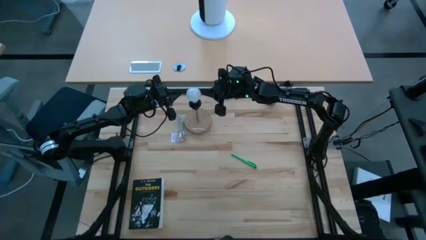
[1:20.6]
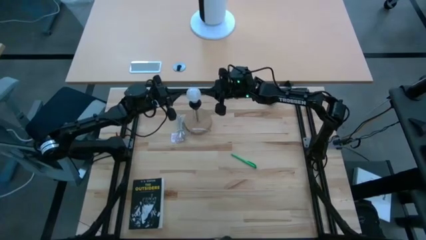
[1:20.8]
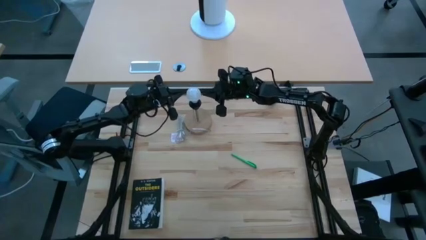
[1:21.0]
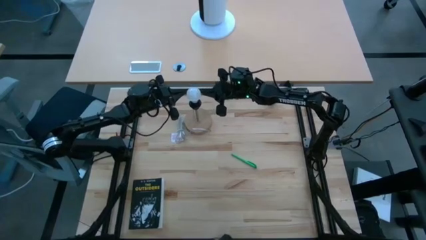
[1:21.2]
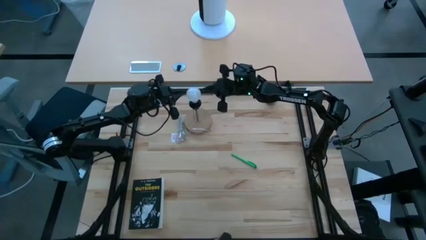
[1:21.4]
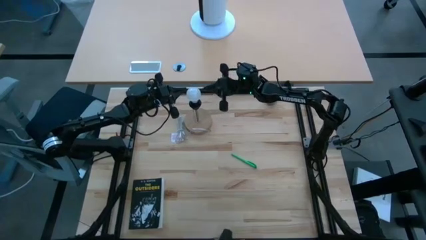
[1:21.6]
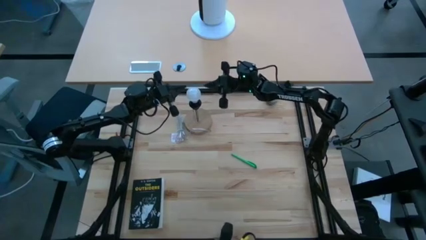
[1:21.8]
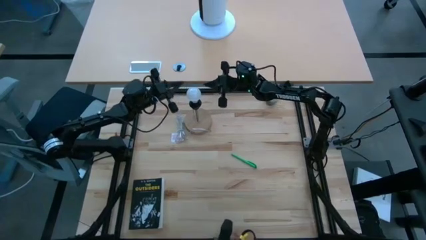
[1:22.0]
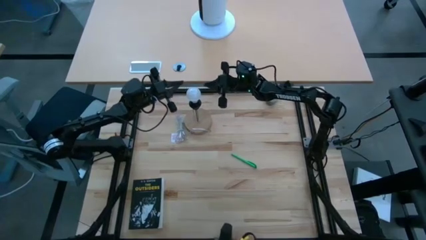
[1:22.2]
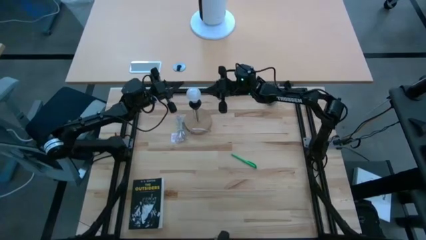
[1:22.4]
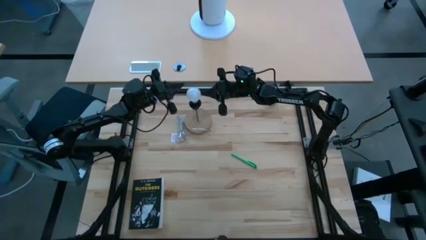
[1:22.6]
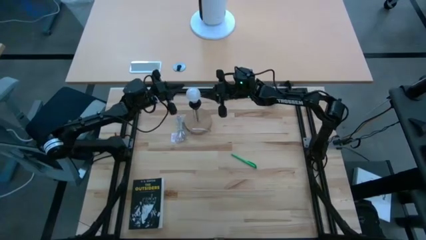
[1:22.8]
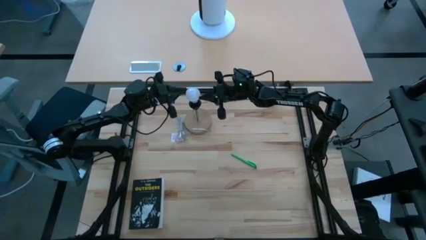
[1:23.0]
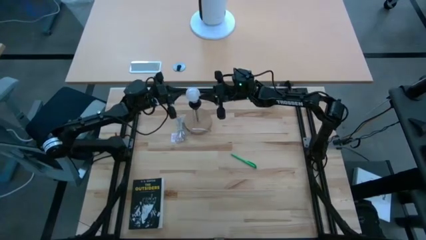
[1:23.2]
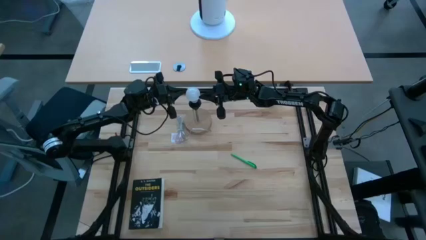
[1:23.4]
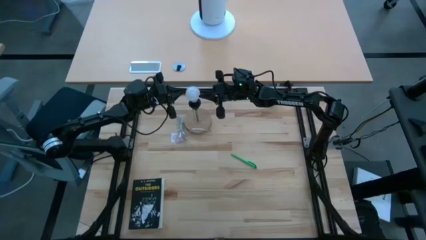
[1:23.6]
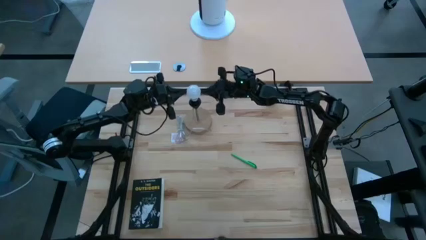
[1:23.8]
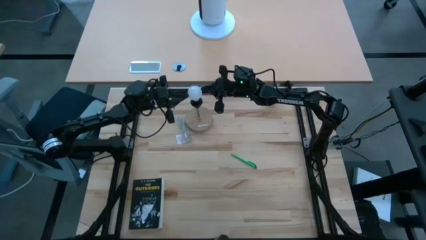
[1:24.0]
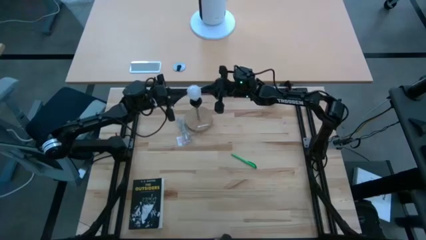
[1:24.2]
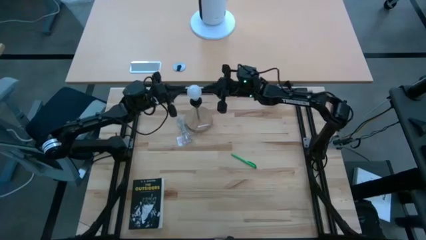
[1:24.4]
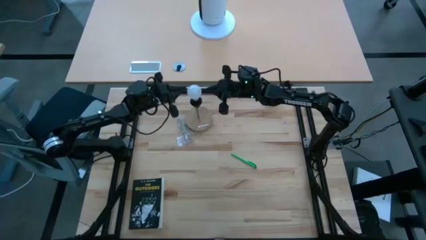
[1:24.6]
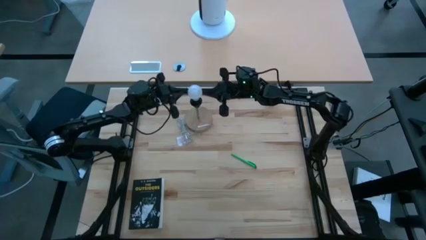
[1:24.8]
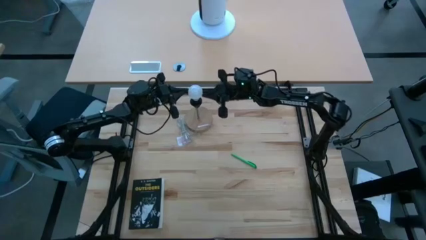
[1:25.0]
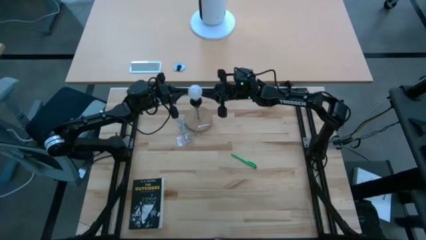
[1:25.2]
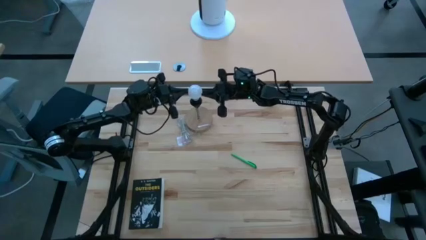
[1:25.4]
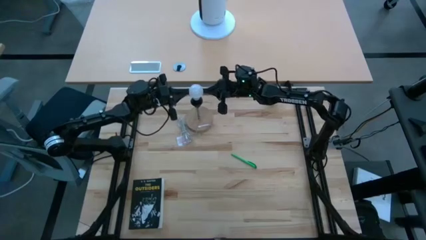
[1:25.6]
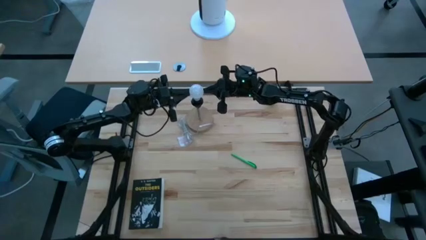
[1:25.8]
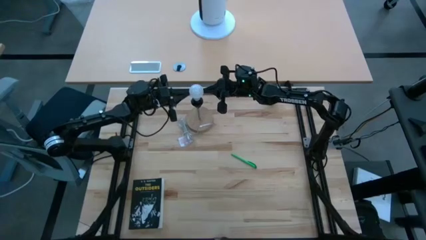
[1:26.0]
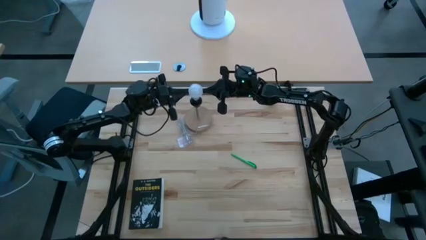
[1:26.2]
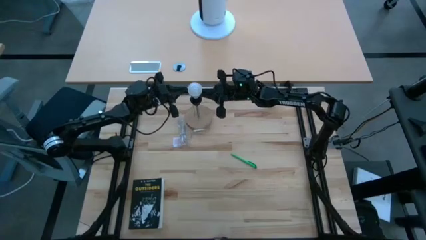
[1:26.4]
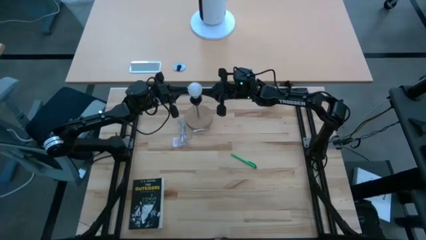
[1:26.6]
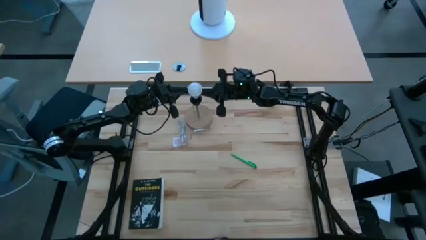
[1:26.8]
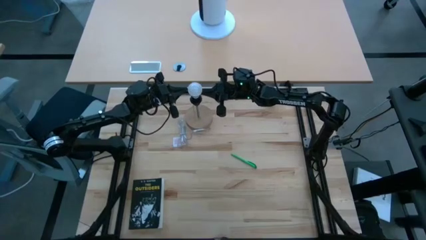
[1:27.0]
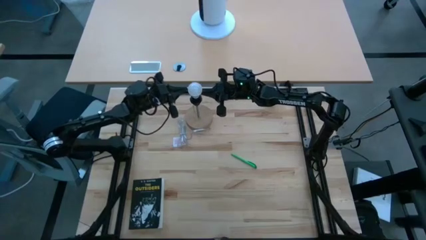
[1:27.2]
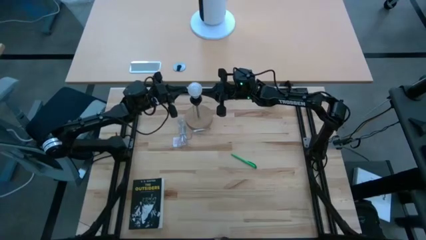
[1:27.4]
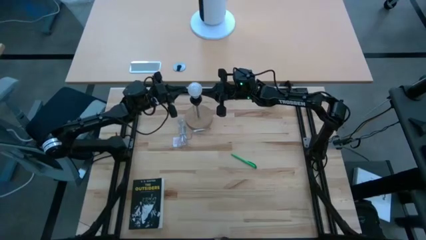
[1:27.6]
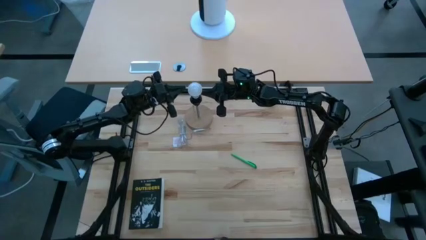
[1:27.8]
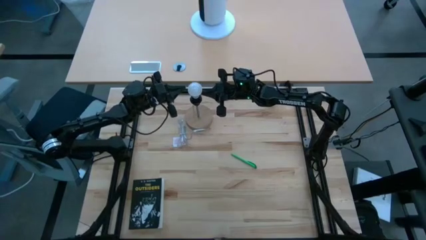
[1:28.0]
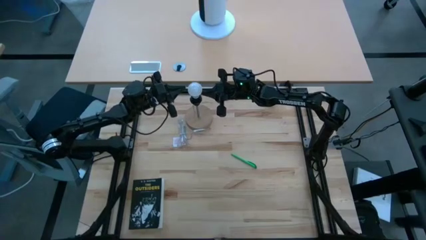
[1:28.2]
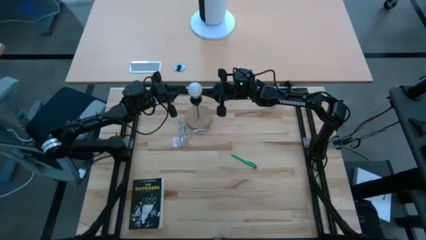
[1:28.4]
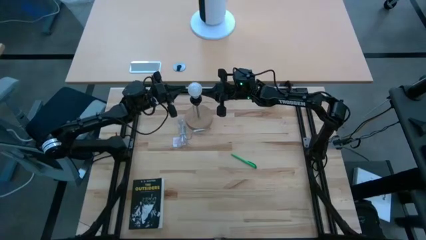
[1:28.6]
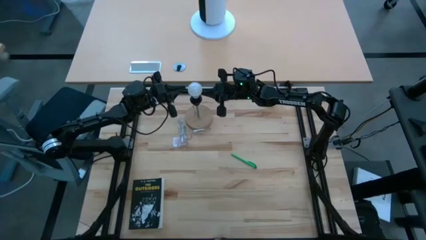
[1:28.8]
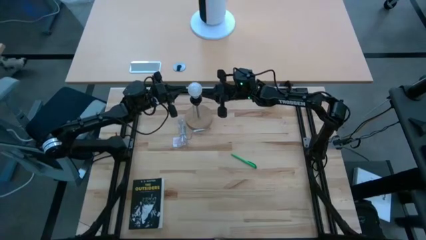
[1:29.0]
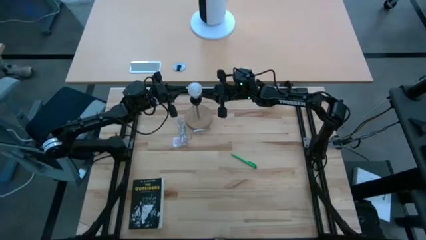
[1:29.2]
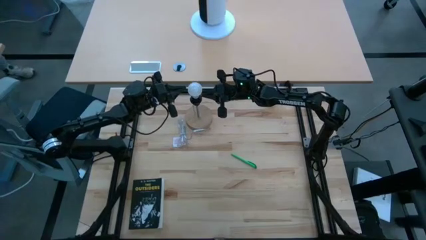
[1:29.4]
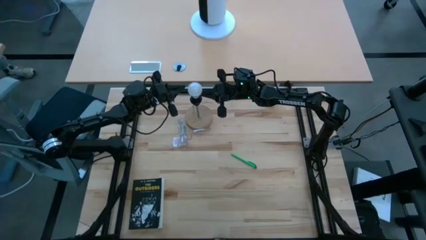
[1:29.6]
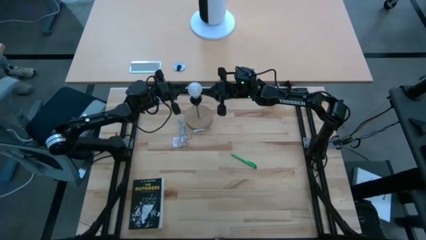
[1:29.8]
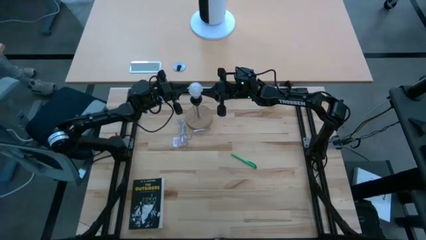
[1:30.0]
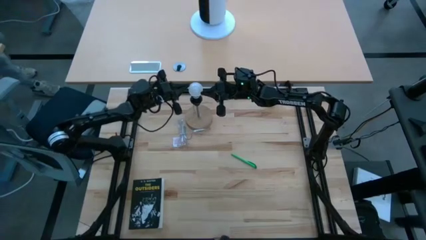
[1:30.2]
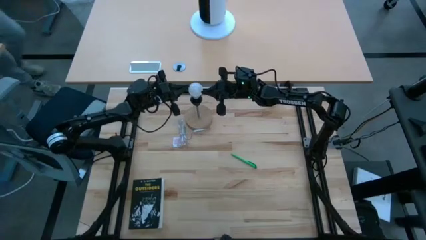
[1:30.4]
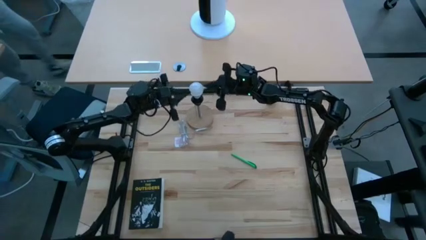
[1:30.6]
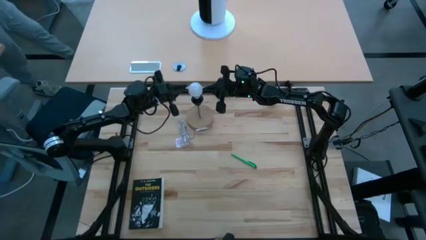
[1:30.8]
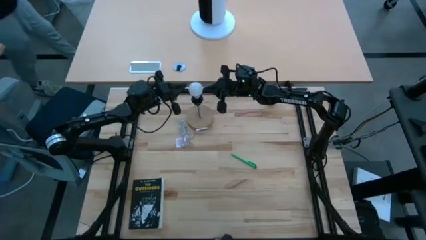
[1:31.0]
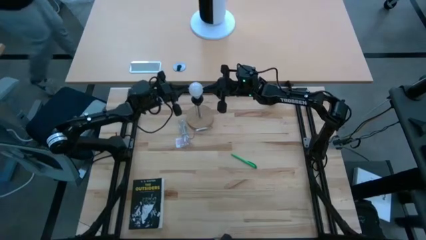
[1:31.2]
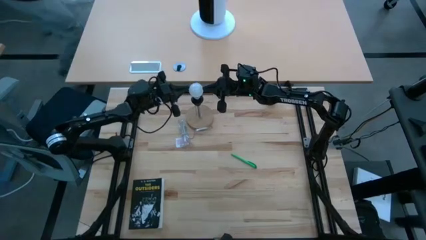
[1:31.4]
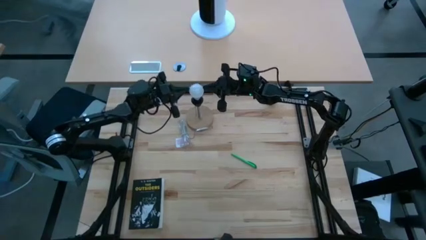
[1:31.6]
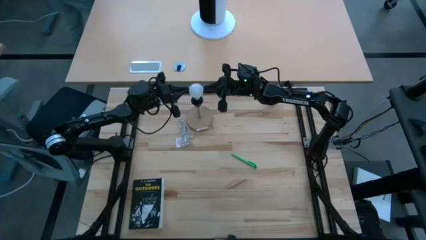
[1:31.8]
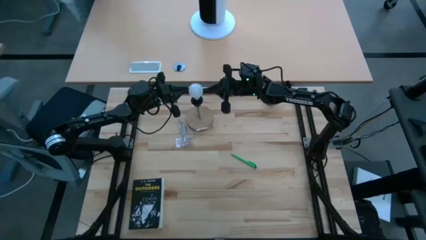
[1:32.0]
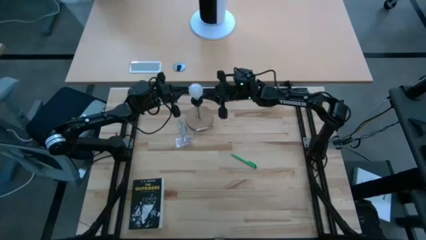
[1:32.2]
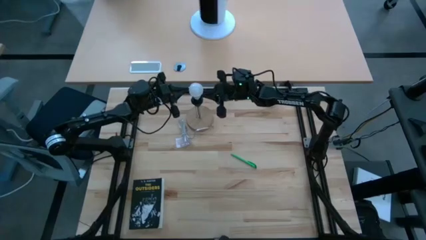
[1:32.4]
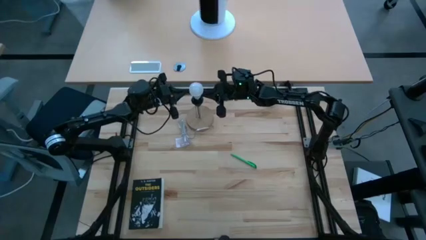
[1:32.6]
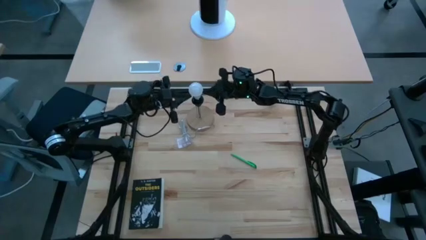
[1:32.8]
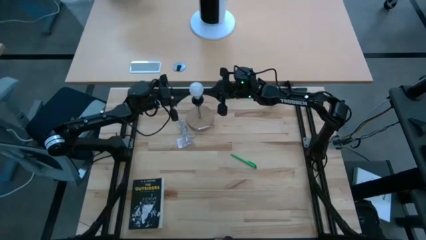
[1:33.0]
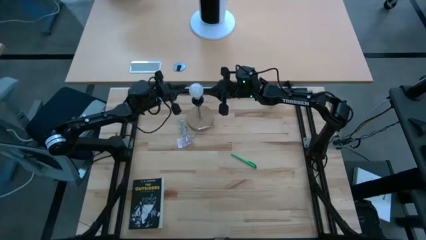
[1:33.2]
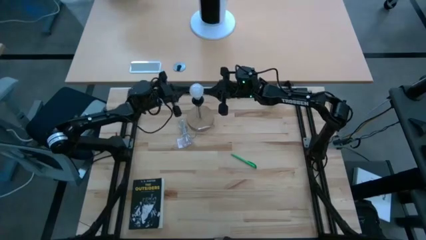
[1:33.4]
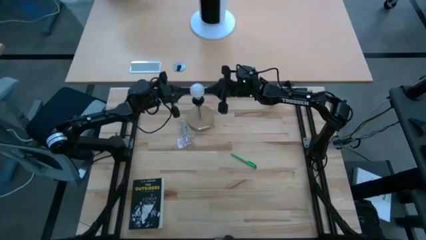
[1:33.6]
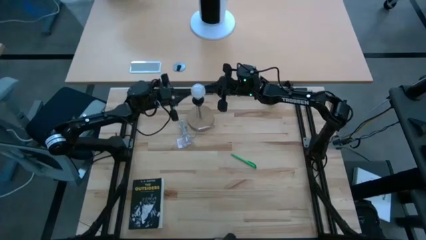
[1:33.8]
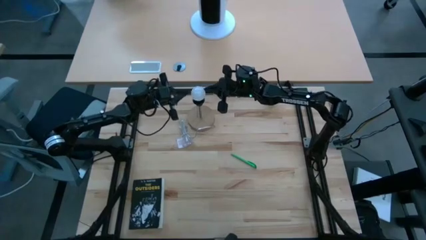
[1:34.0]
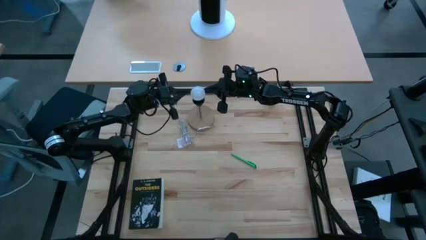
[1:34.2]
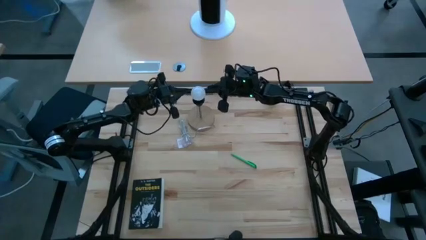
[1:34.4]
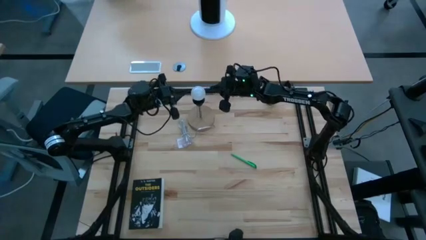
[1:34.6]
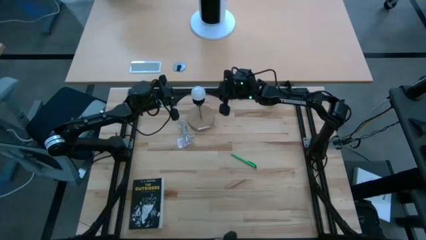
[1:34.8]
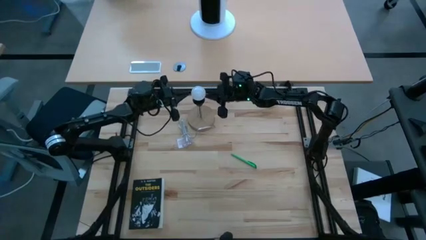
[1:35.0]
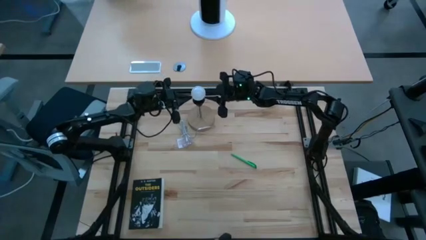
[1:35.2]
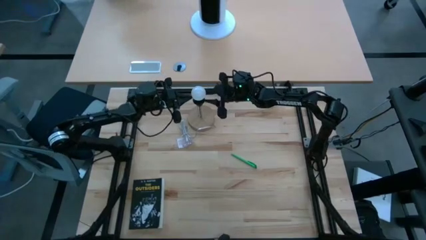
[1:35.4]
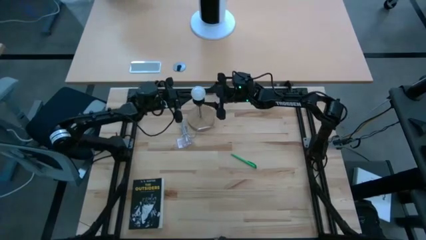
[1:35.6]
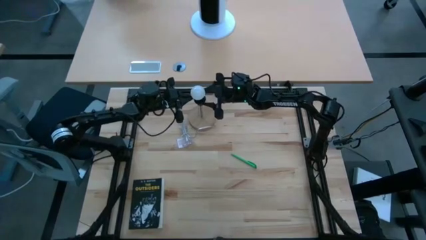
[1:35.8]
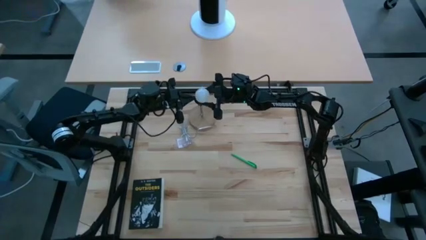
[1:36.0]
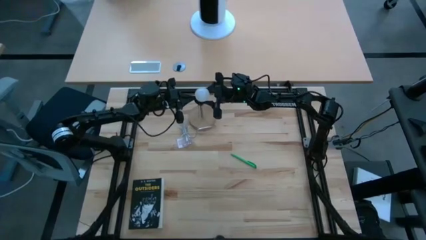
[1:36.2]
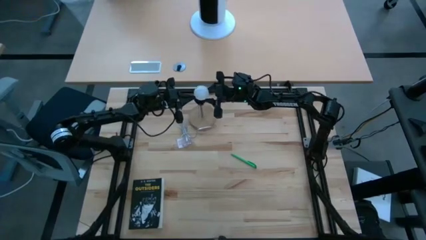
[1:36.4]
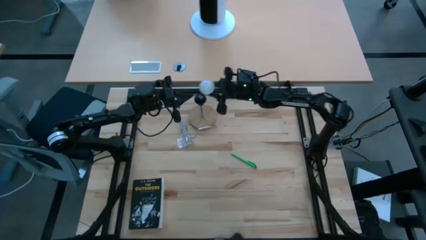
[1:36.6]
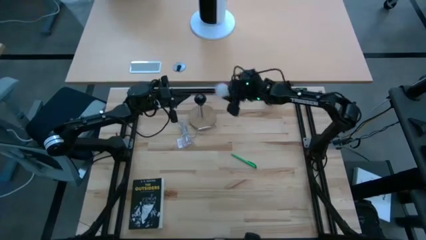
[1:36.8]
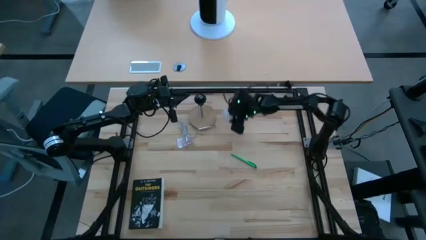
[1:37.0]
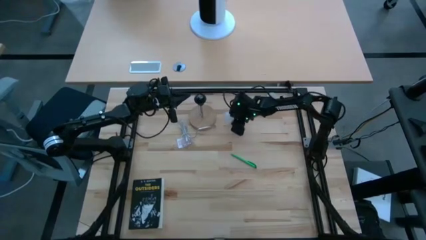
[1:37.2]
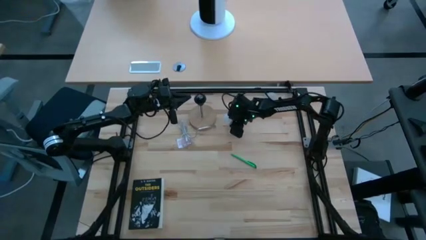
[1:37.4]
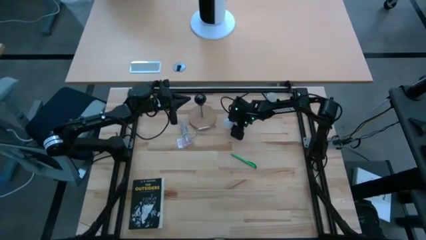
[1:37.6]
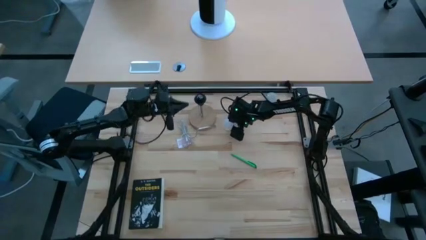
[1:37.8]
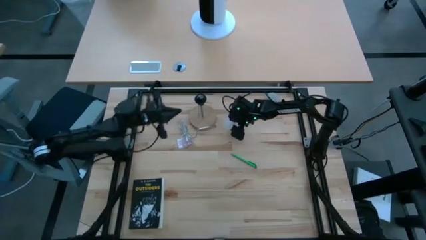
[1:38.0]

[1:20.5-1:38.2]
Task: Screw lightbulb
Remove the lightbulb from the lamp
